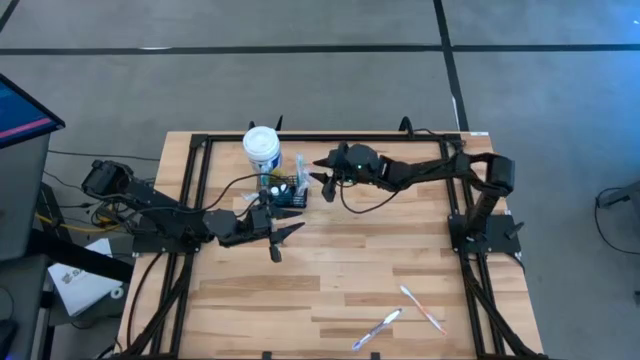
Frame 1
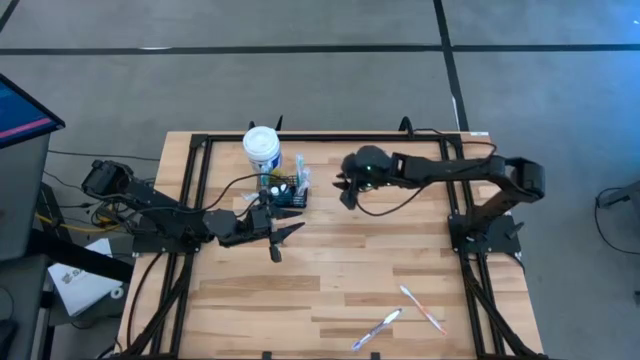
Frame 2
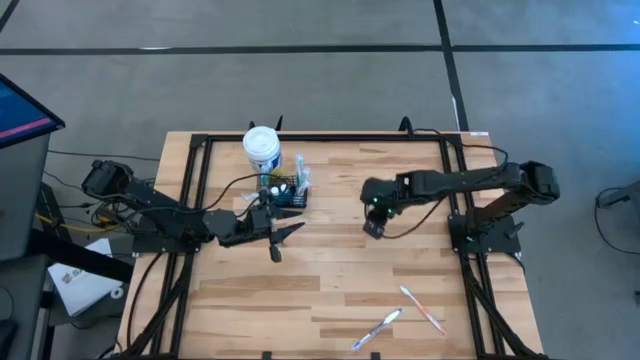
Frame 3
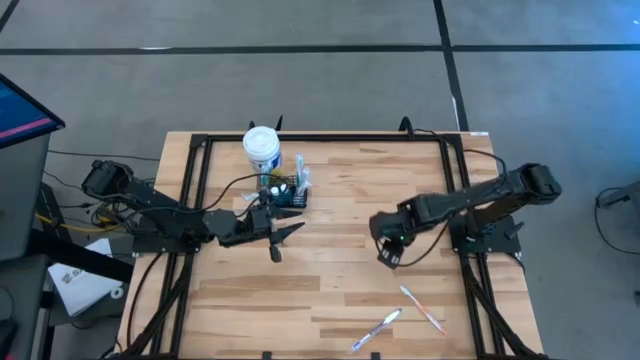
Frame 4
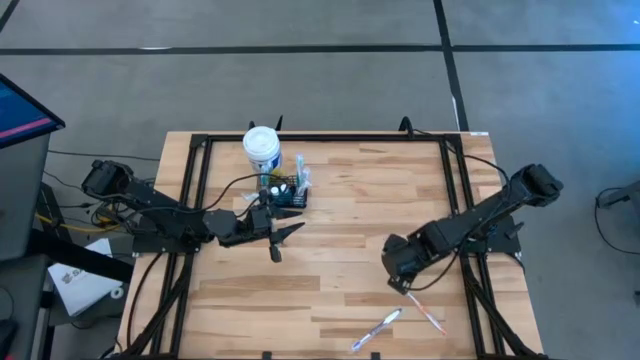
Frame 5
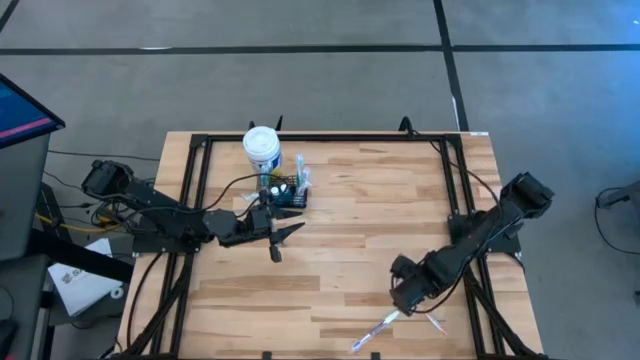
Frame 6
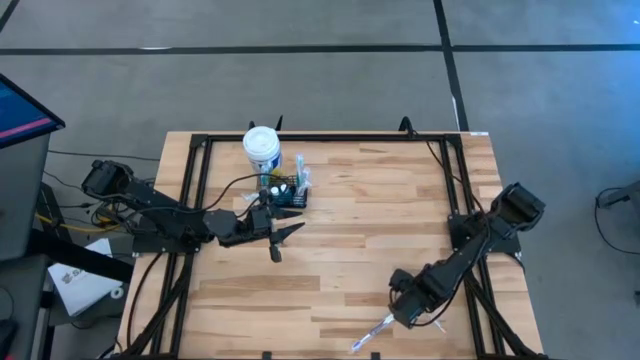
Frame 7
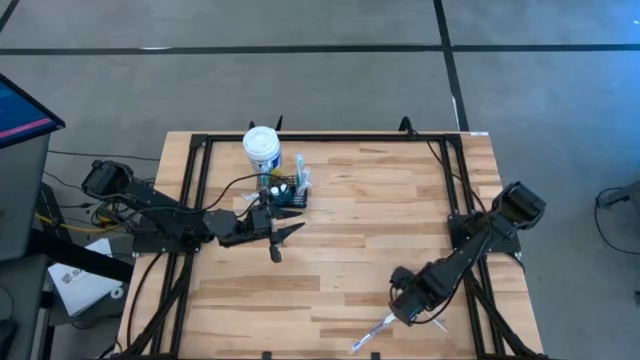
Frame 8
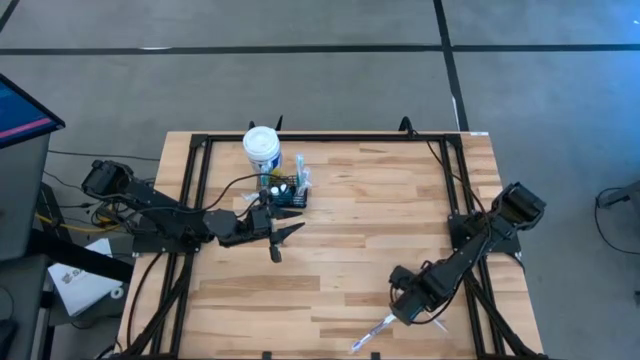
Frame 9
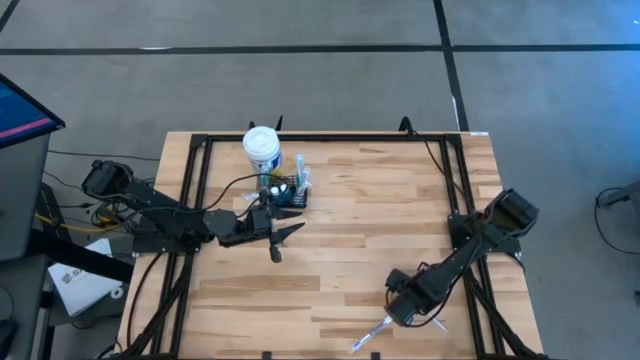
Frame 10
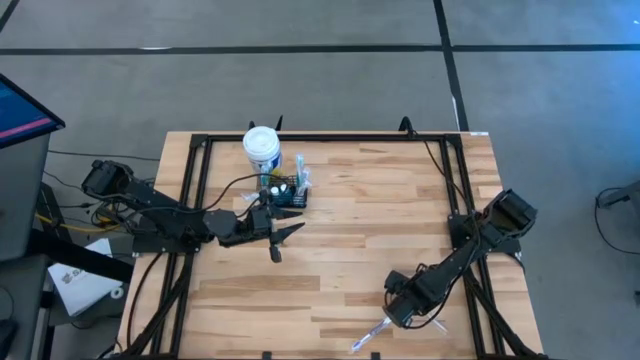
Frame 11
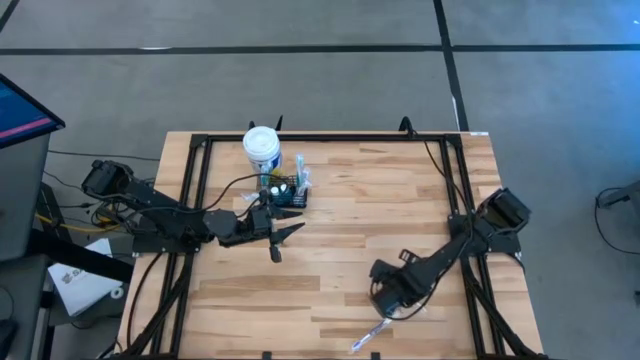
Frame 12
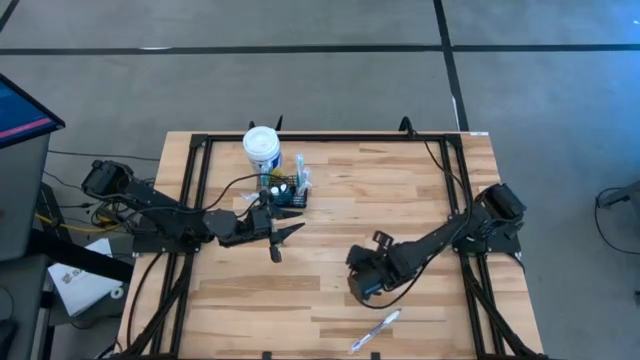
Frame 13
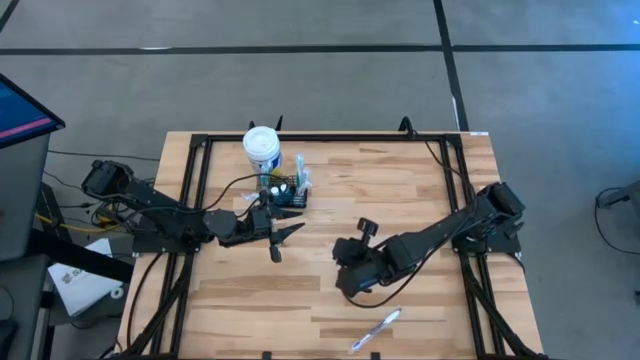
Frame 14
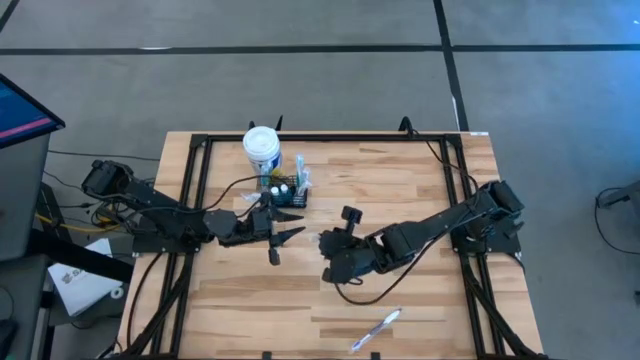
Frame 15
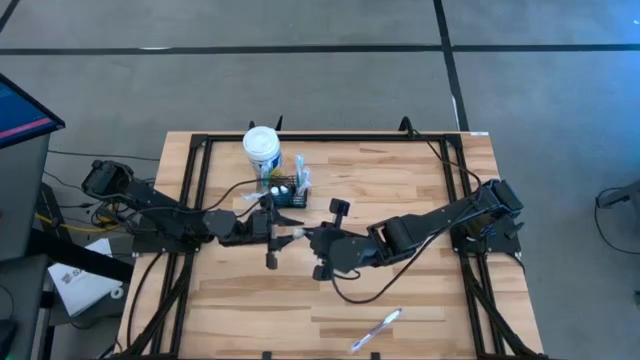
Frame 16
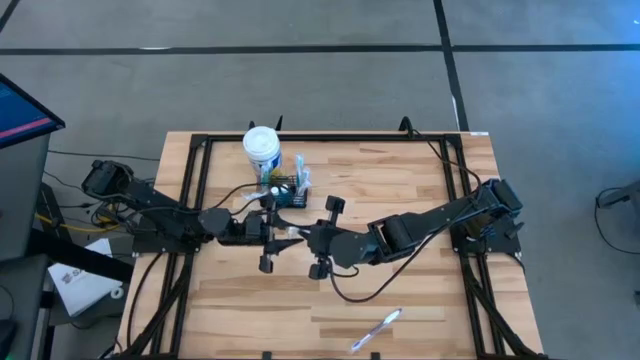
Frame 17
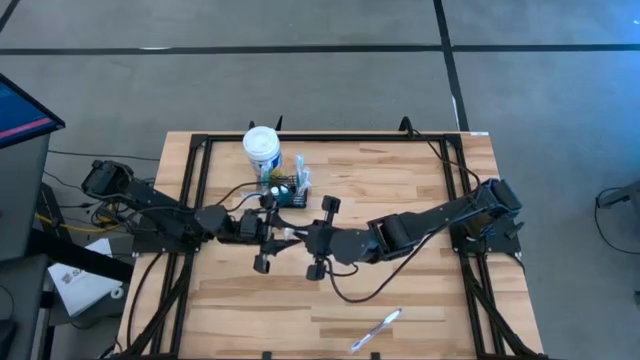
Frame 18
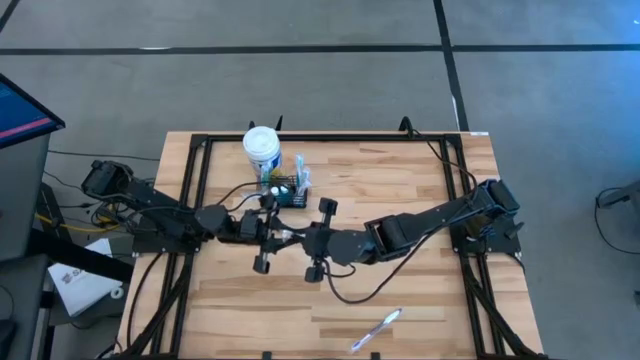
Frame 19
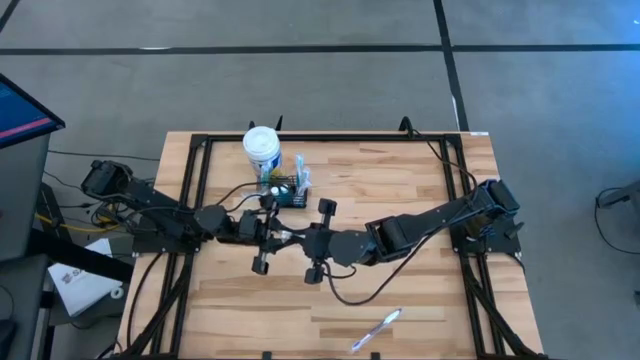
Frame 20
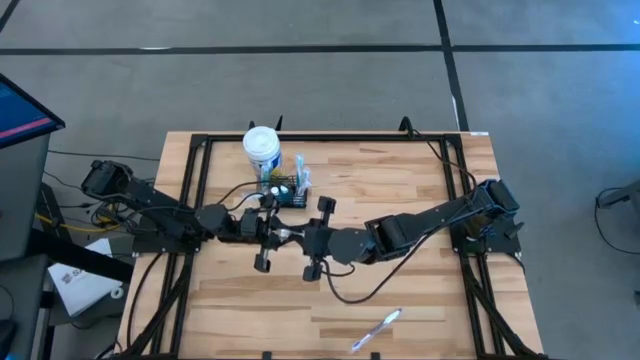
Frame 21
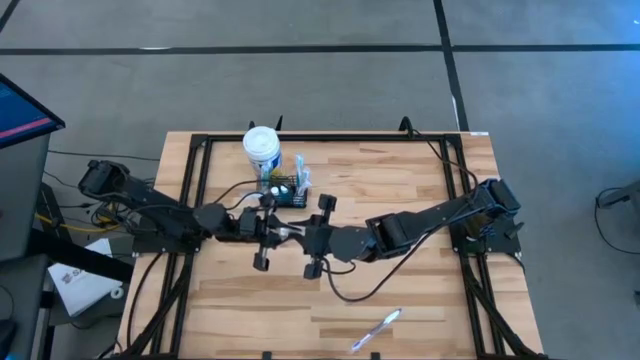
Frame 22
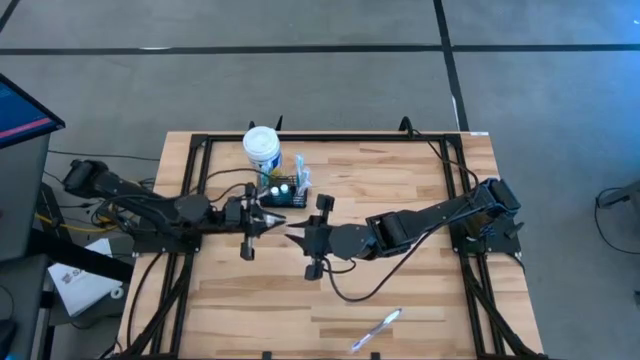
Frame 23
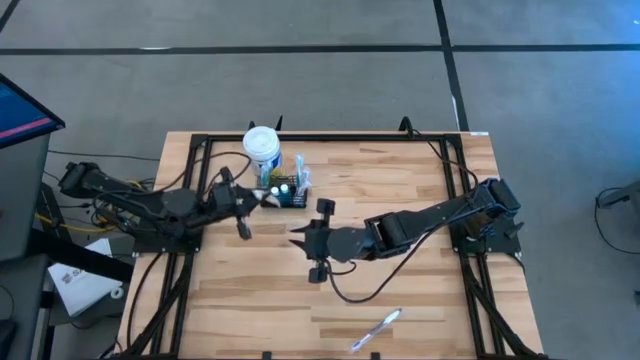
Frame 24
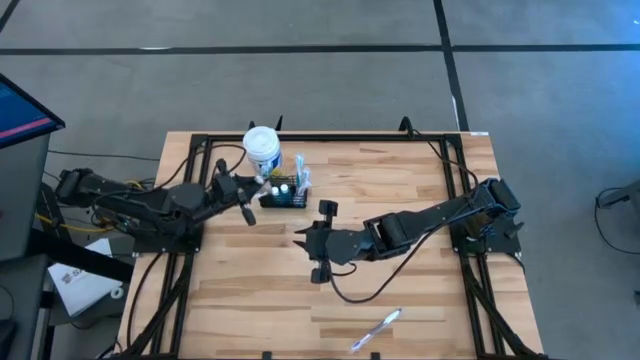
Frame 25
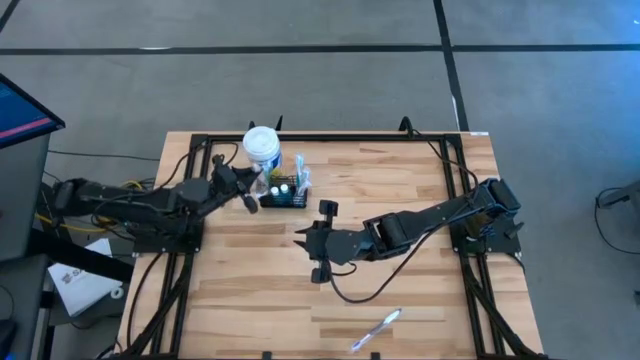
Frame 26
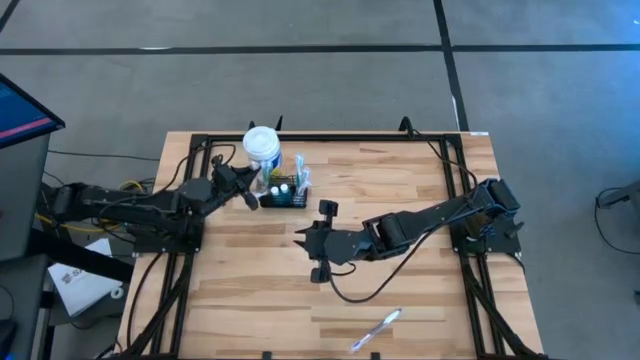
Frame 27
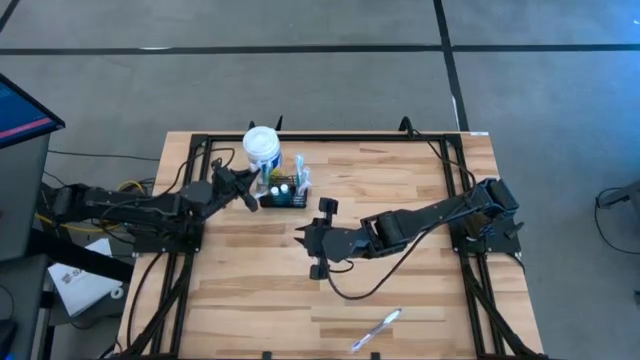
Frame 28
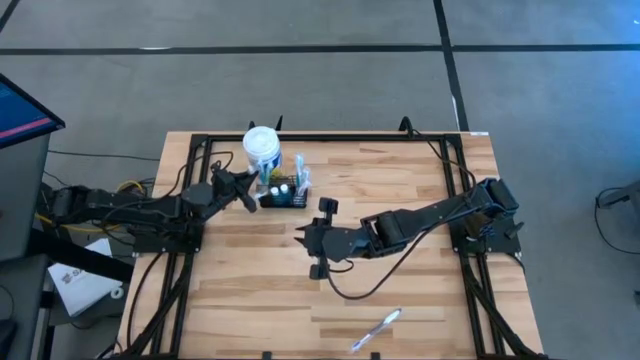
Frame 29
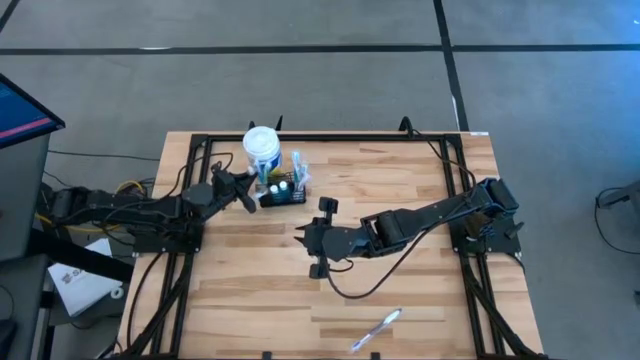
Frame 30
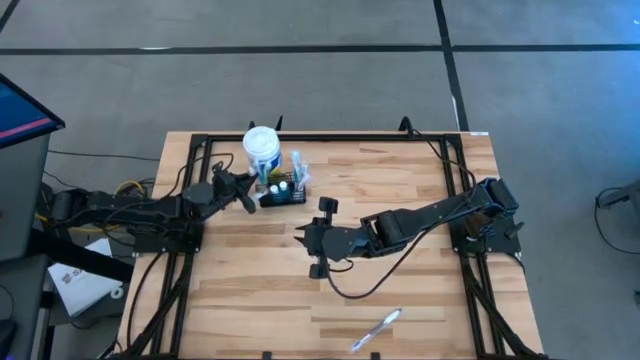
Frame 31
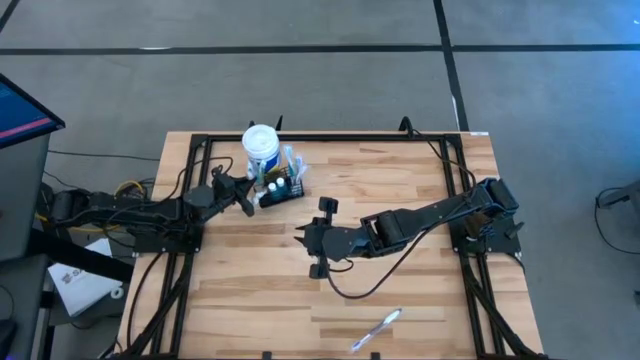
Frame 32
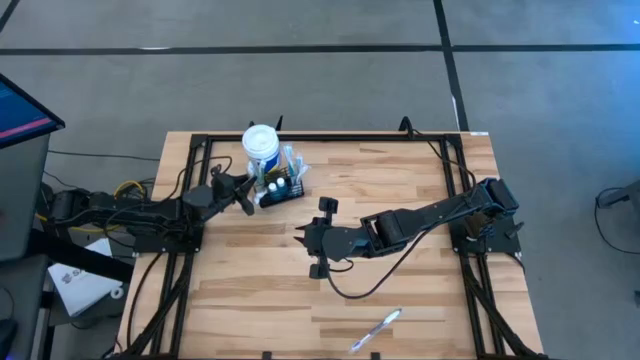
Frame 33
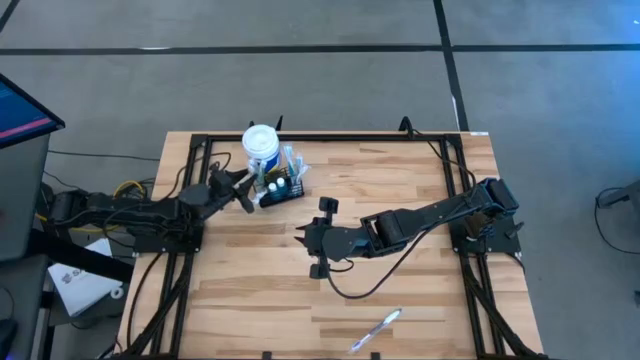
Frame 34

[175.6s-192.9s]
Task: Pick & Place toothbrushing station
Put the orange toothbrush into the wire organizer

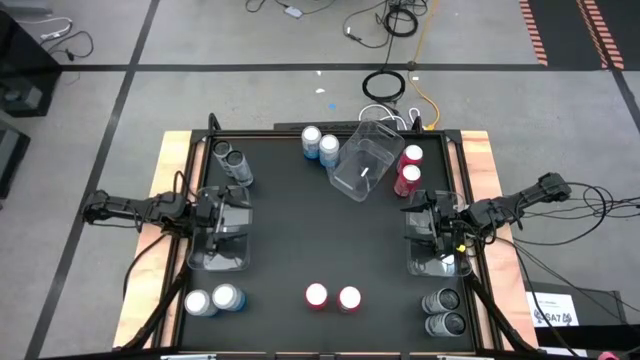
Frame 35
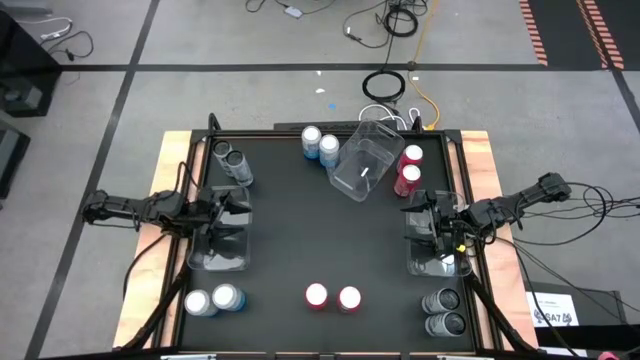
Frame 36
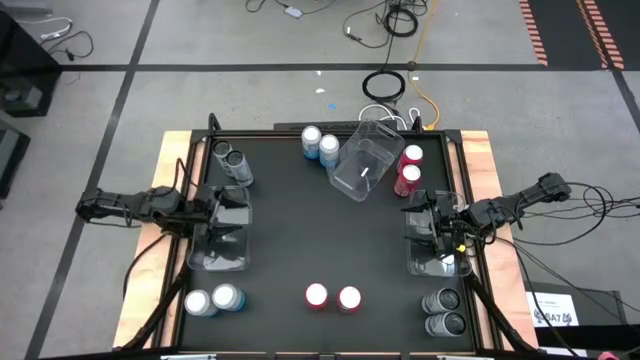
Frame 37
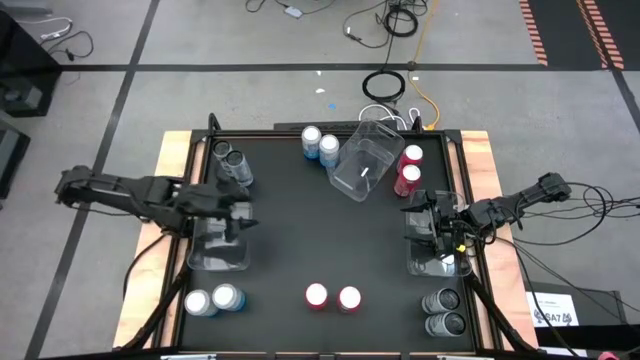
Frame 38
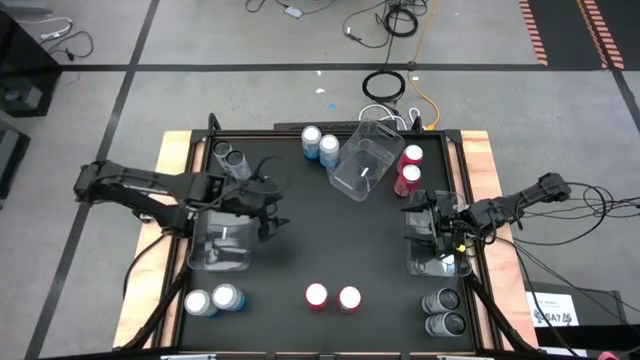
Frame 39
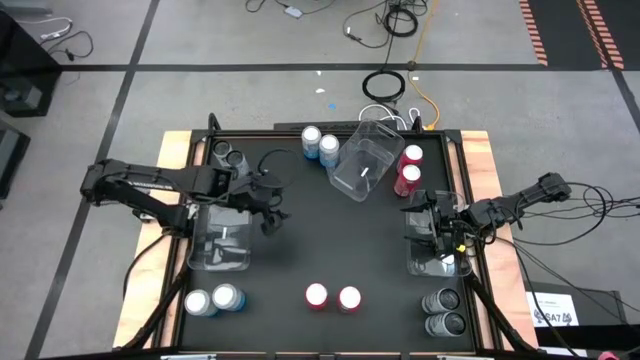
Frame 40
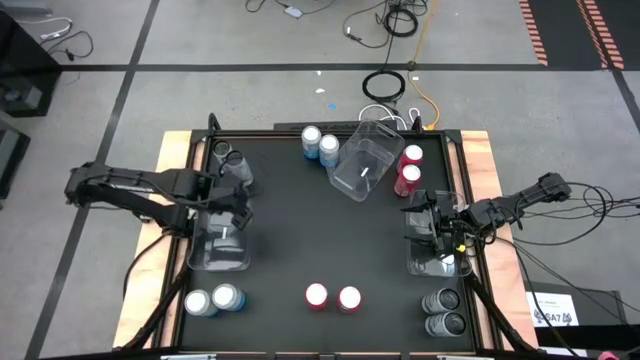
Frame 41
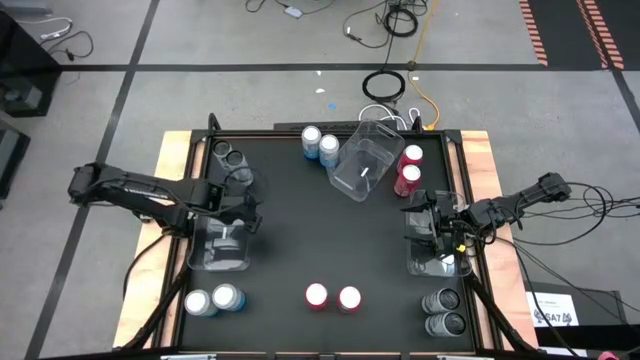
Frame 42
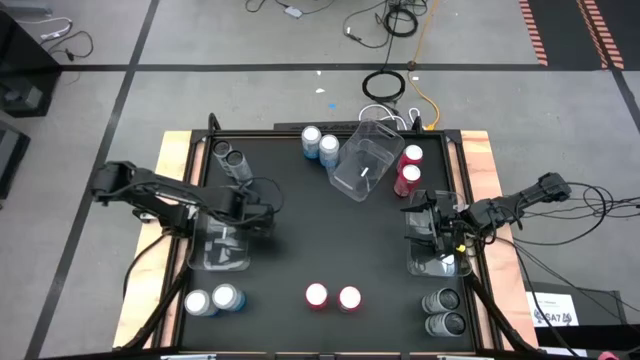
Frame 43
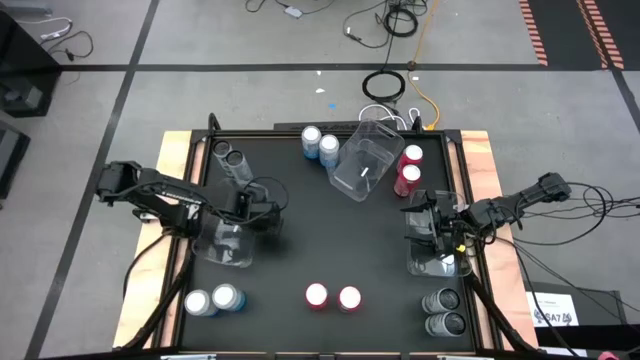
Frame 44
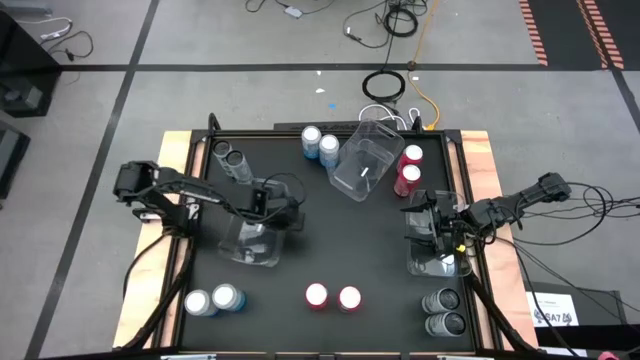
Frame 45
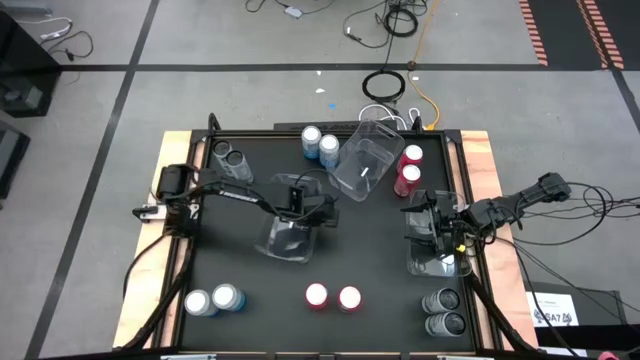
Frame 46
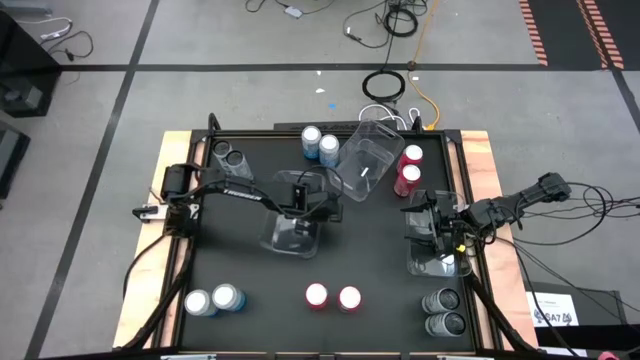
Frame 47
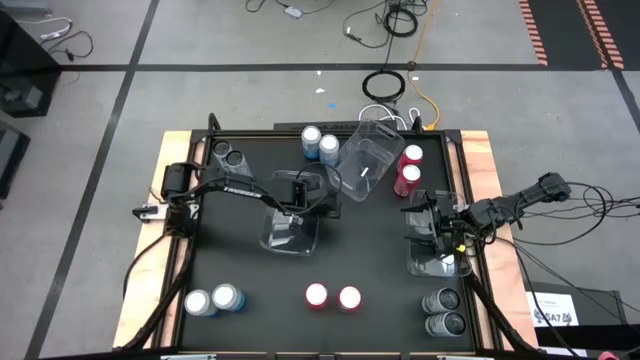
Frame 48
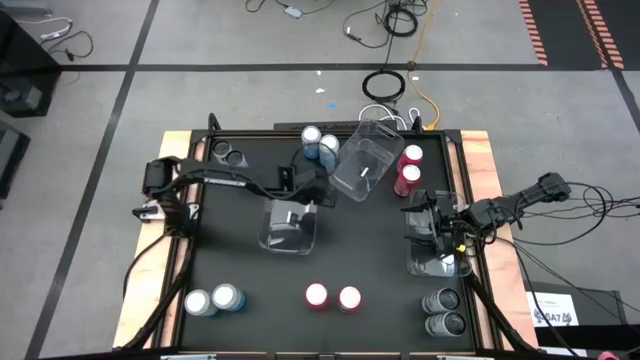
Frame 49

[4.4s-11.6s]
Task: Sort soda cans
Move the left transparent bin to the center of the table
